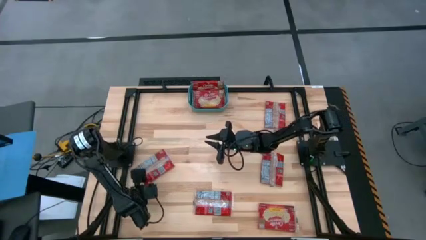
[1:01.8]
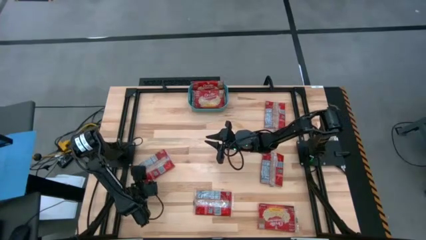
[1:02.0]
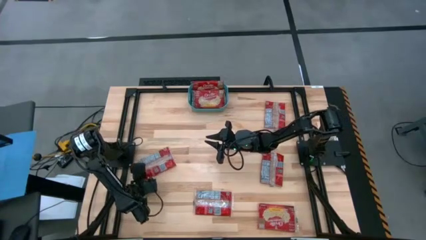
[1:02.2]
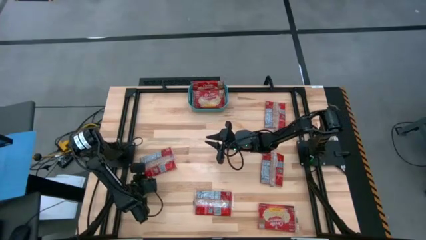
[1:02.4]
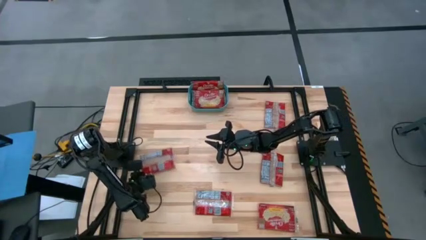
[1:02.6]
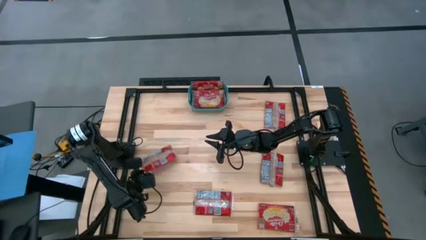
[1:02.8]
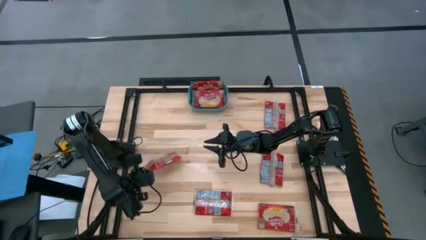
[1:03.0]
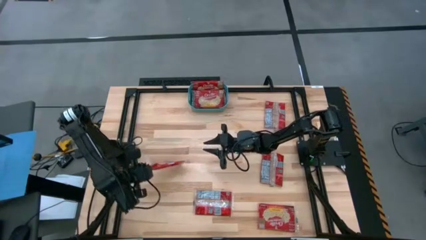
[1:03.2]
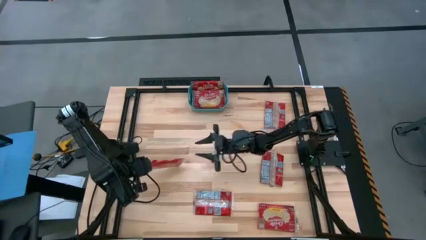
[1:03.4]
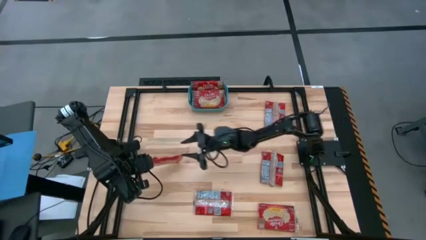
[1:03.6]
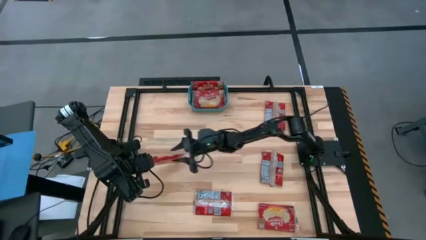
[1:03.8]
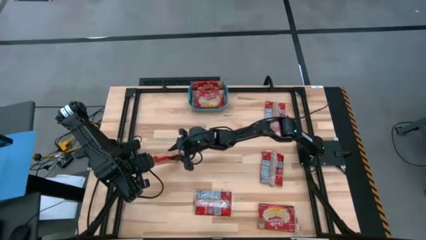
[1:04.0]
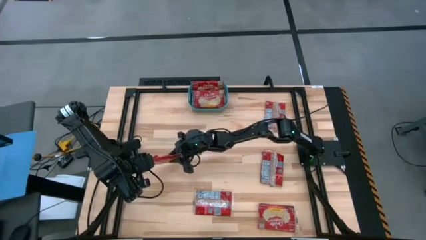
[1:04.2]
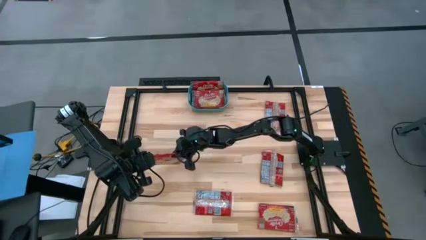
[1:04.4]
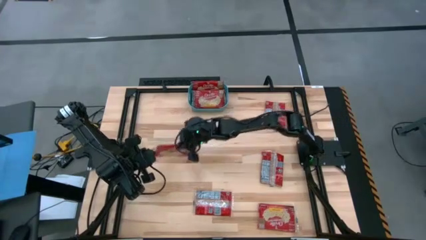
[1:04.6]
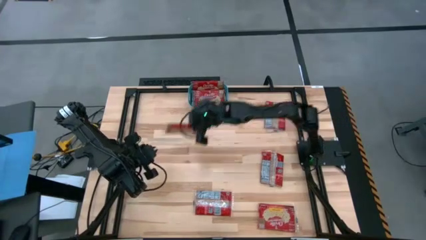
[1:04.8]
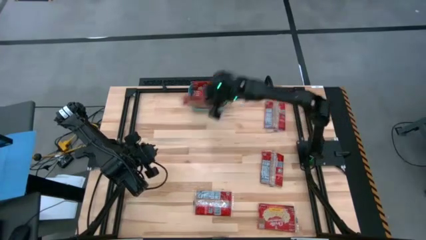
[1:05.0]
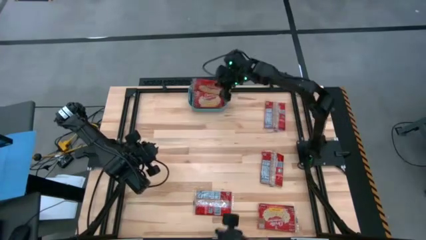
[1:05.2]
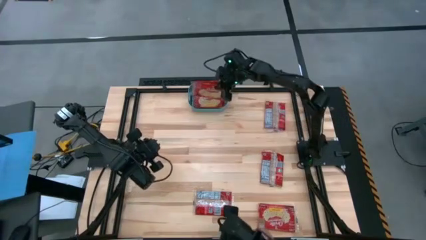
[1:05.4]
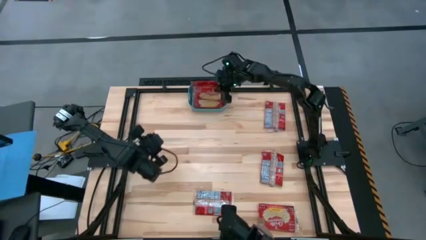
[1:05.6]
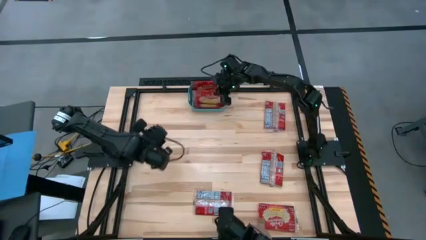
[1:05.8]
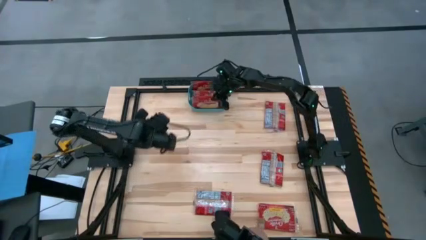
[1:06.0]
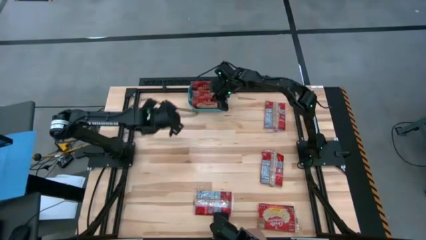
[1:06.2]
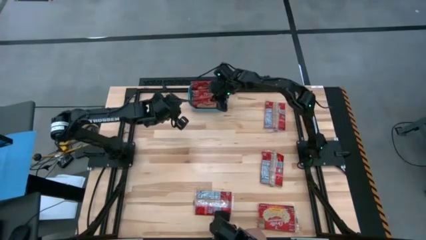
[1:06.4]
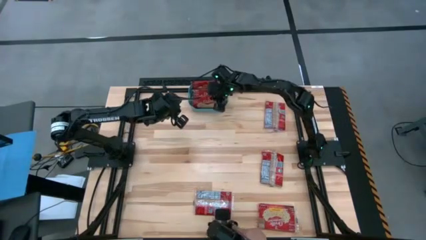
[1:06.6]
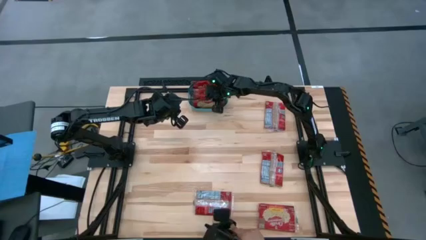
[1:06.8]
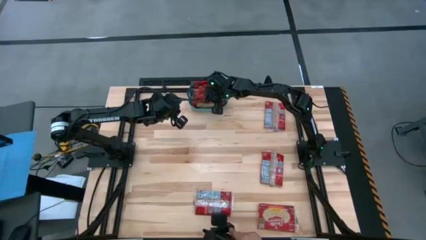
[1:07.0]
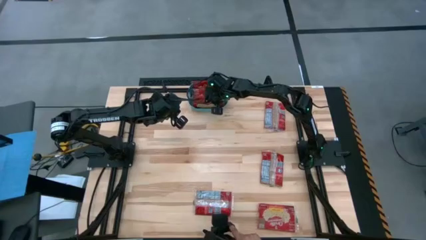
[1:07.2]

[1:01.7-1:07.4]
Task: Sort popcorn bags into baskets
Put the red popcorn bag into the green basket

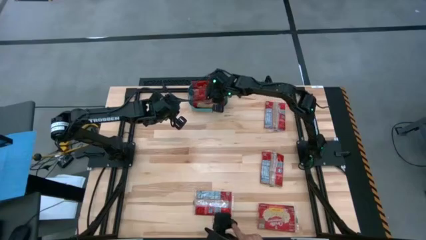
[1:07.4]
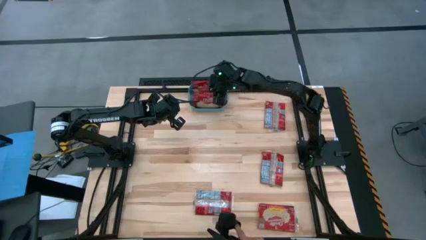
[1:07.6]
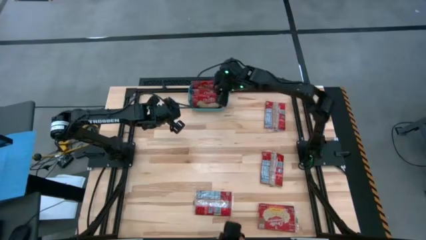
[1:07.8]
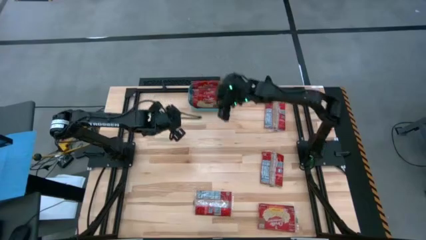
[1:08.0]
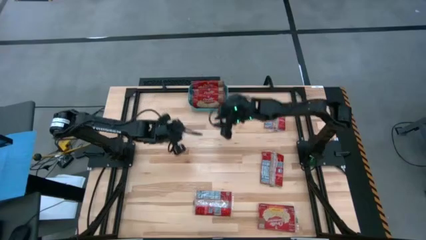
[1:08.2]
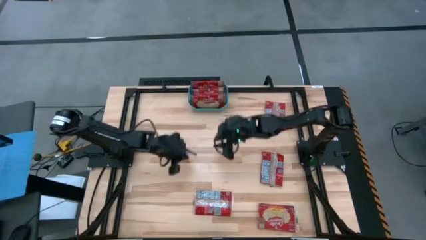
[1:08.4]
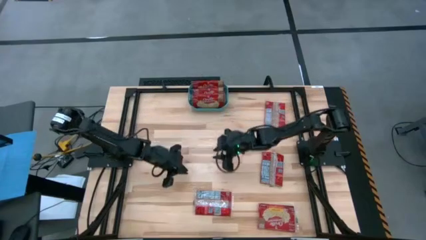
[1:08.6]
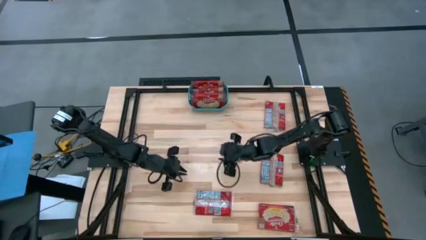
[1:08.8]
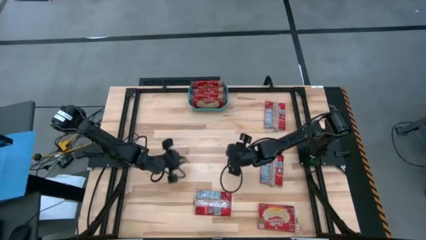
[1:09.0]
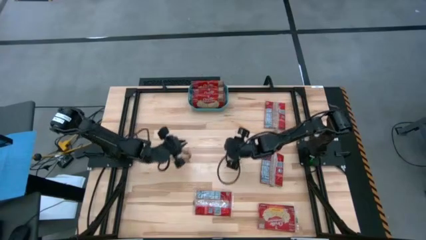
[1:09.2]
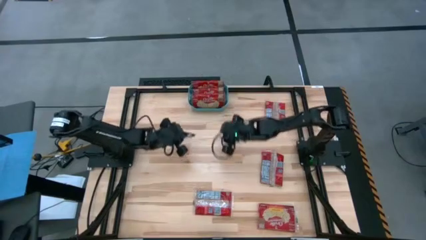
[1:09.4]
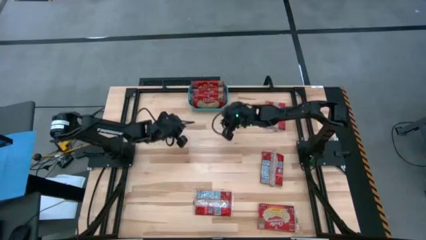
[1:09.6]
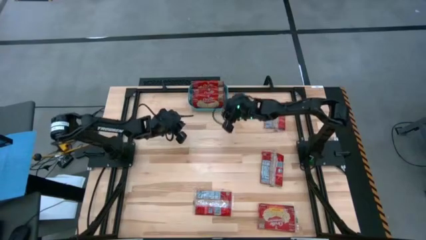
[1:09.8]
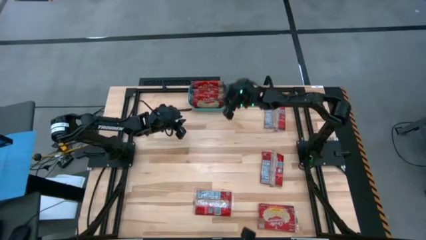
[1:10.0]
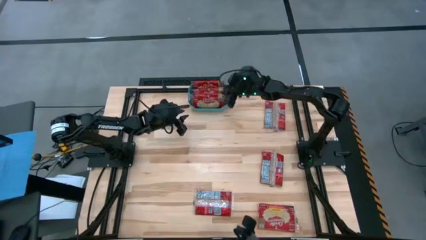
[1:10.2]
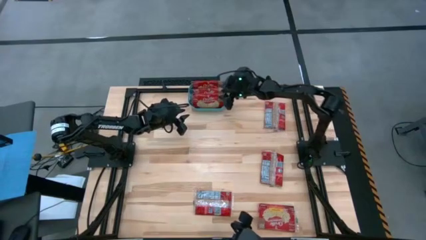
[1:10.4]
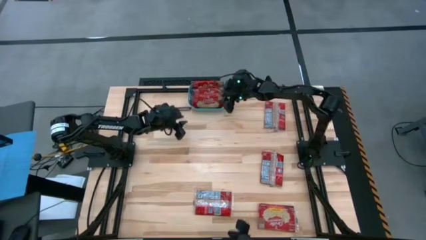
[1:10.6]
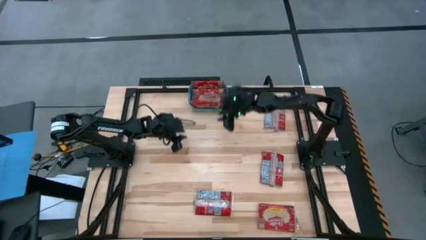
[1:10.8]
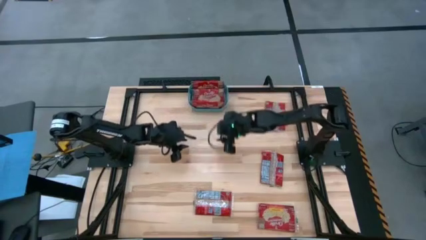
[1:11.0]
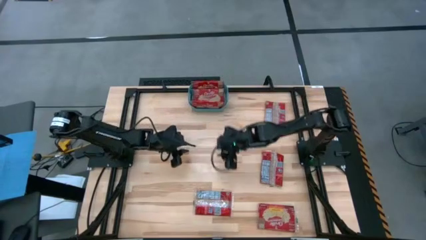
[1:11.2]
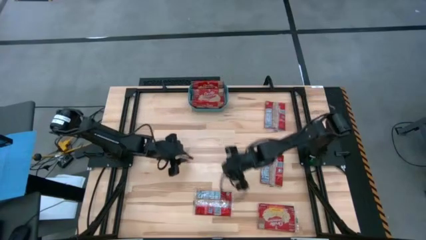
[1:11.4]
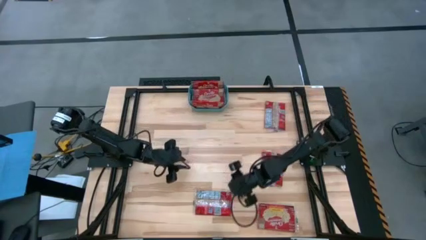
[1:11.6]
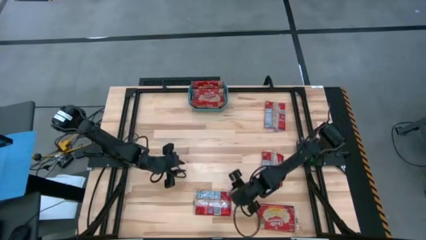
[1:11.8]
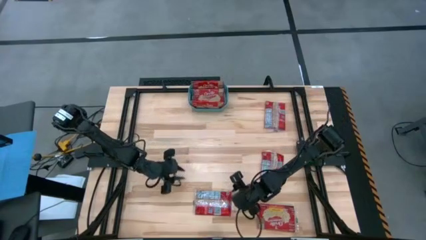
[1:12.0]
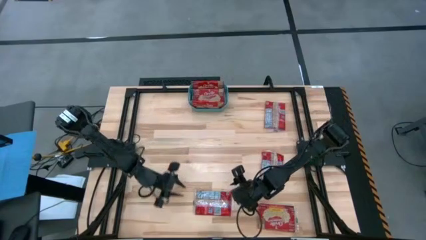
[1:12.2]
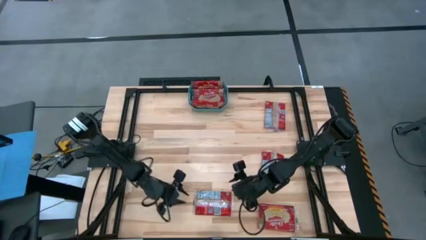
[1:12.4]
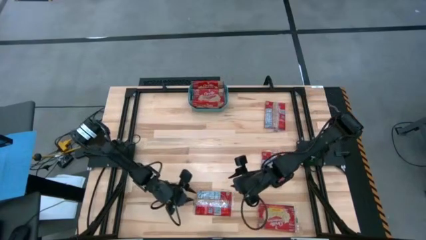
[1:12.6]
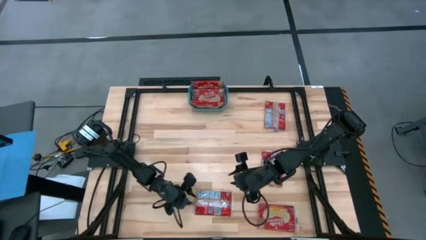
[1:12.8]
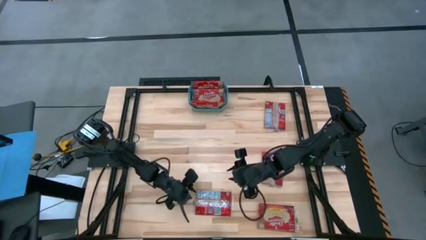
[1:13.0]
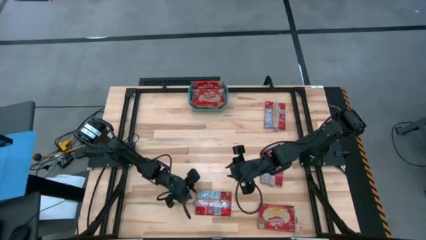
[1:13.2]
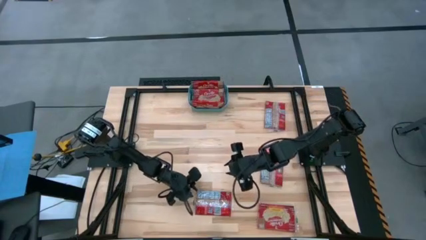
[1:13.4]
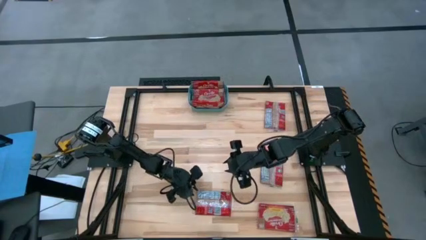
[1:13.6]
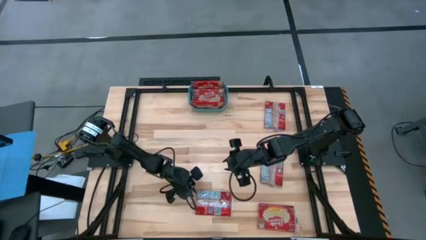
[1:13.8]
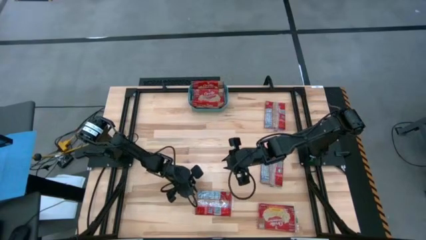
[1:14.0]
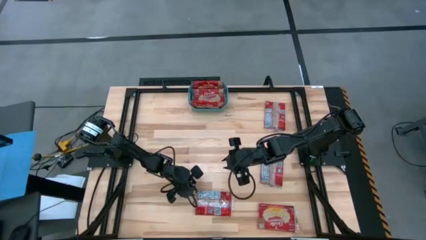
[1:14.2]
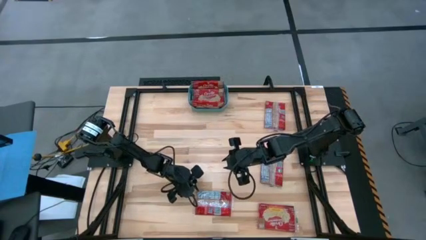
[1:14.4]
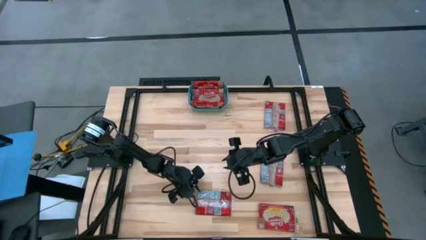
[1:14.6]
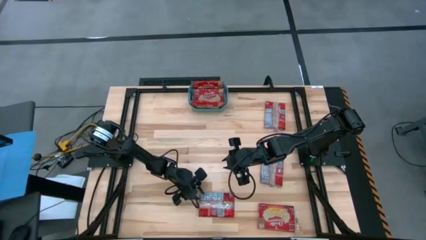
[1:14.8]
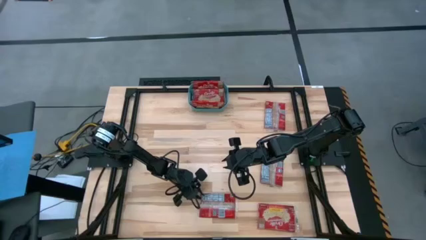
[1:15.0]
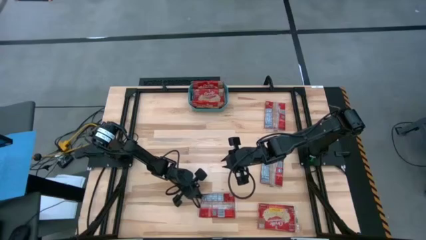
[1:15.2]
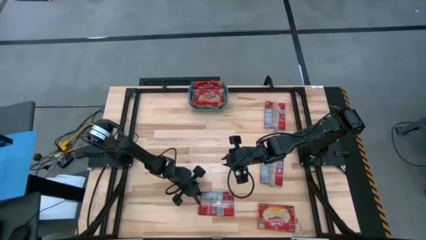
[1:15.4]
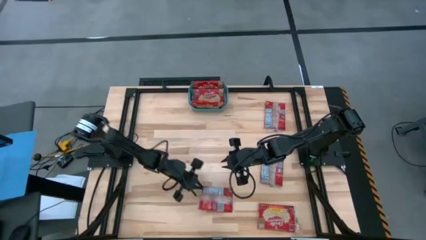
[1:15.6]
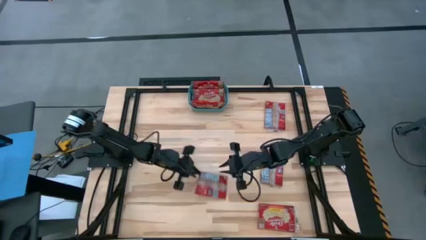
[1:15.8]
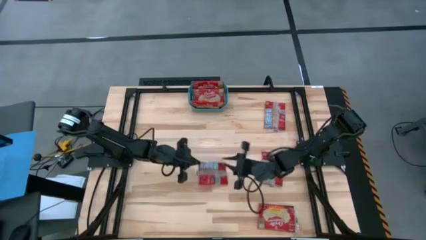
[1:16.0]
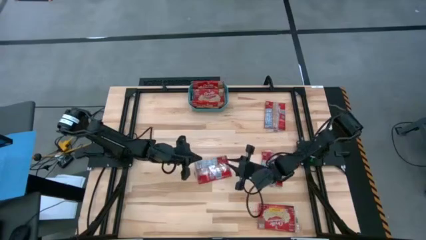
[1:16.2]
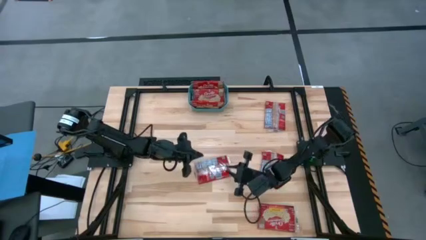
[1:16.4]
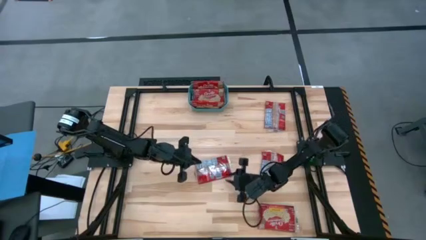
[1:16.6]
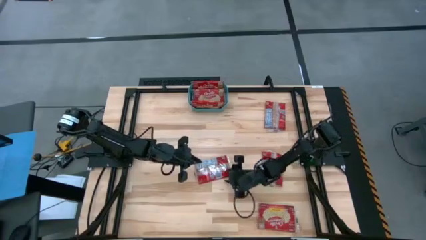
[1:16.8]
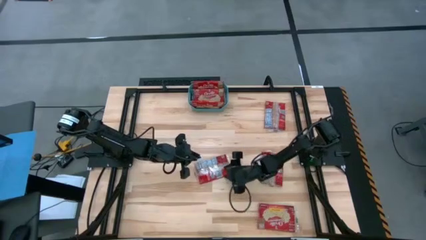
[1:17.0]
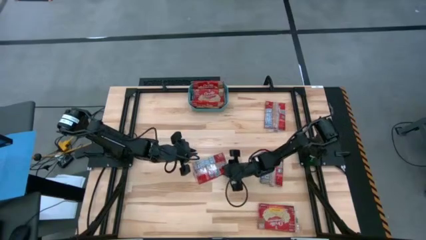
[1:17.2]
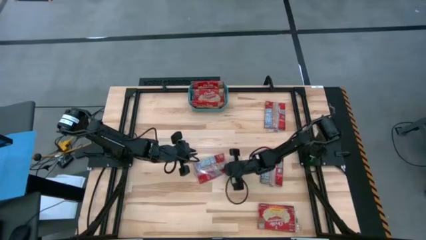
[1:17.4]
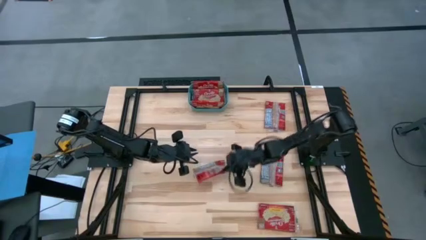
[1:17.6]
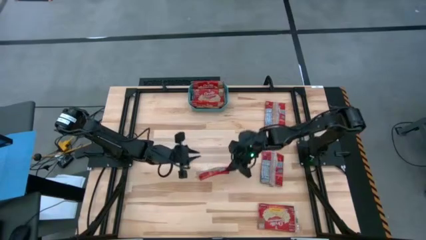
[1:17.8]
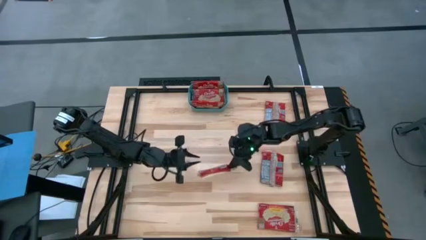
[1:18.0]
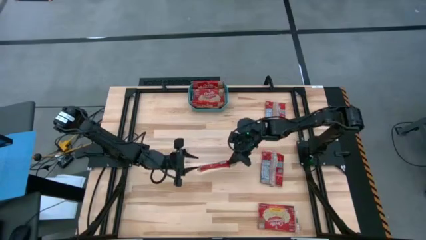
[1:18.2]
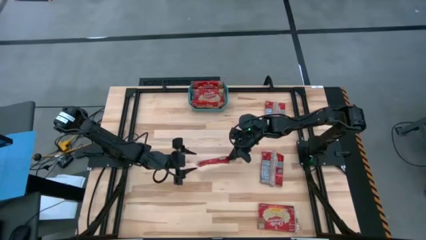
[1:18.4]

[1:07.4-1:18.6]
Put the red popcorn bag into the green basket
